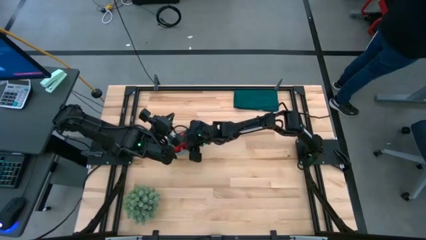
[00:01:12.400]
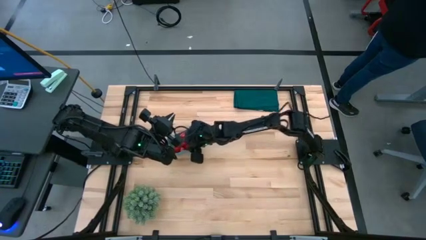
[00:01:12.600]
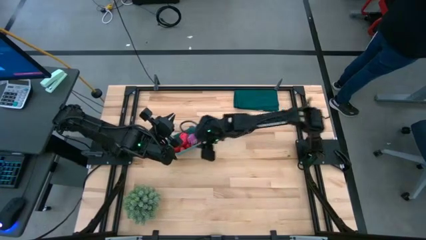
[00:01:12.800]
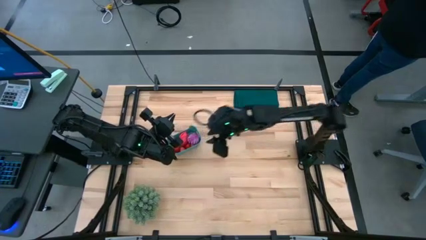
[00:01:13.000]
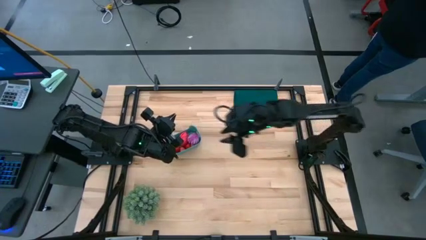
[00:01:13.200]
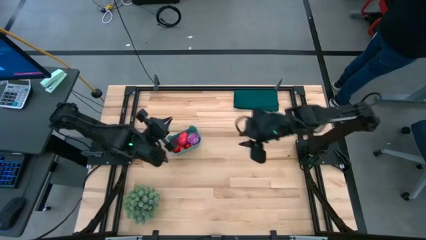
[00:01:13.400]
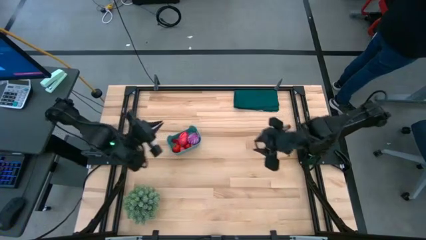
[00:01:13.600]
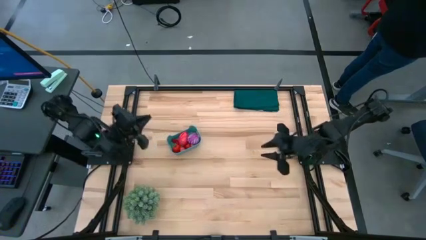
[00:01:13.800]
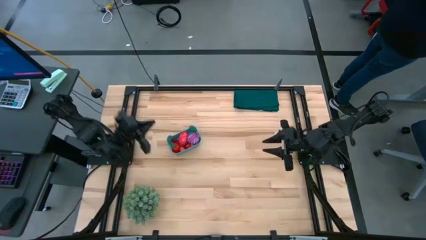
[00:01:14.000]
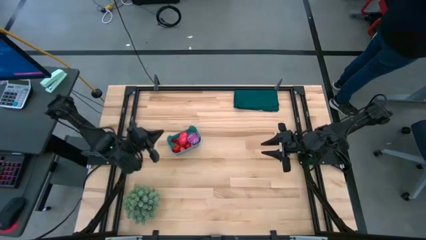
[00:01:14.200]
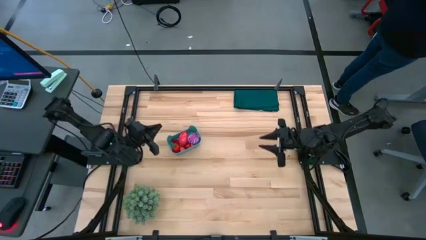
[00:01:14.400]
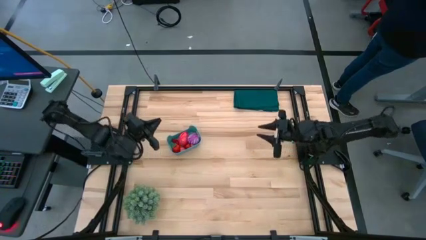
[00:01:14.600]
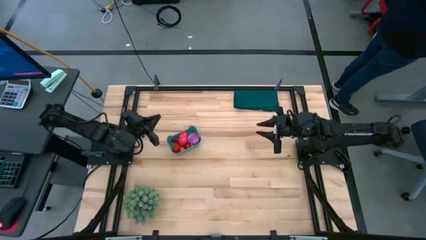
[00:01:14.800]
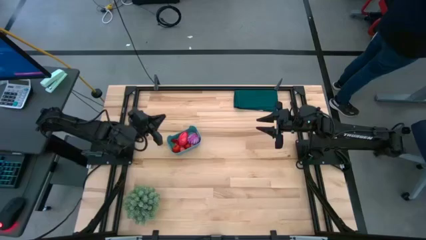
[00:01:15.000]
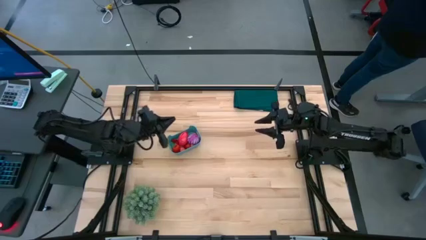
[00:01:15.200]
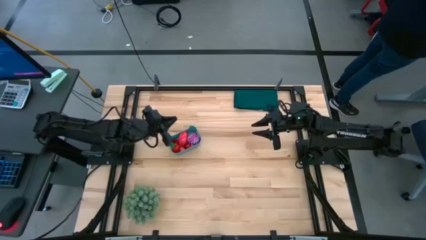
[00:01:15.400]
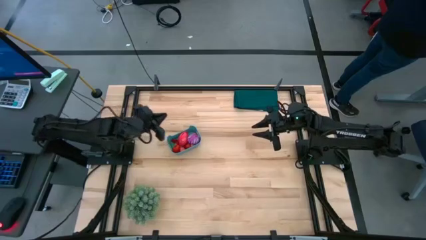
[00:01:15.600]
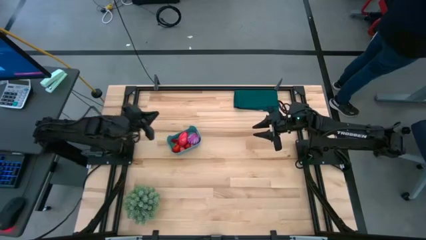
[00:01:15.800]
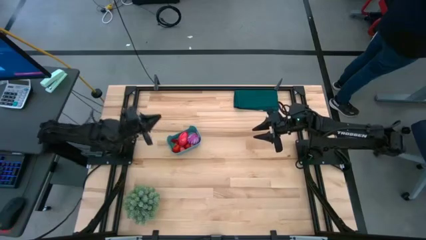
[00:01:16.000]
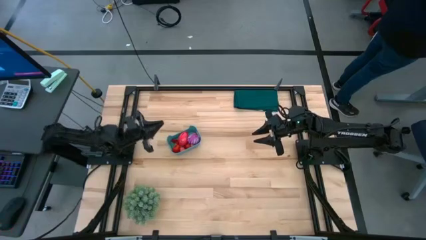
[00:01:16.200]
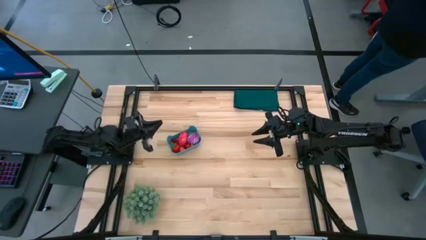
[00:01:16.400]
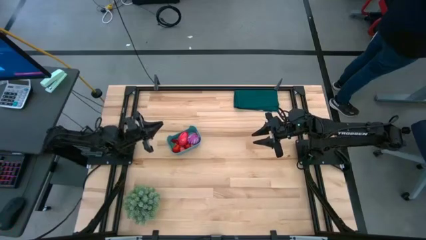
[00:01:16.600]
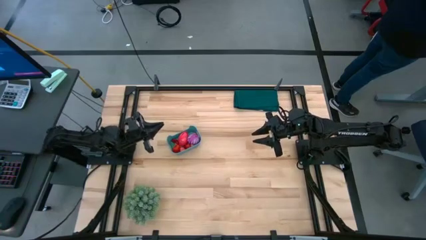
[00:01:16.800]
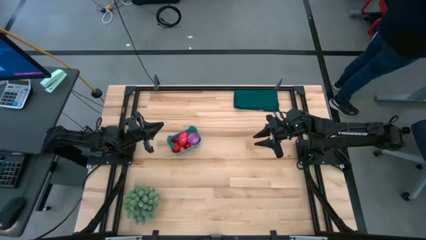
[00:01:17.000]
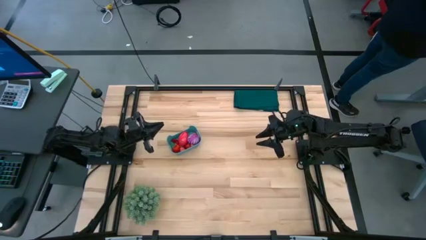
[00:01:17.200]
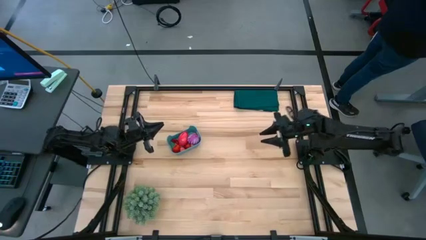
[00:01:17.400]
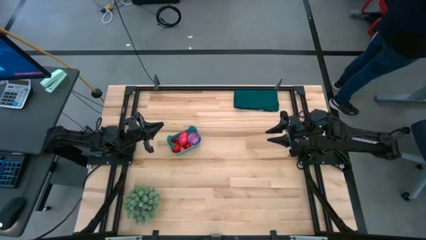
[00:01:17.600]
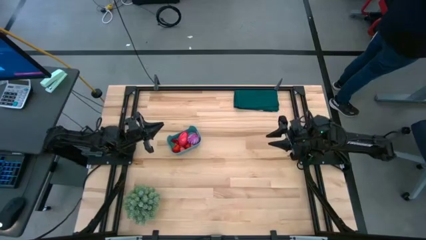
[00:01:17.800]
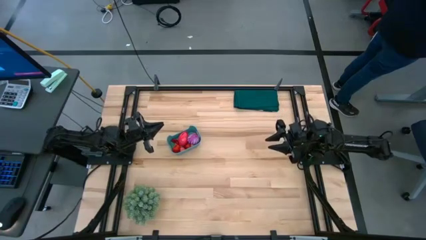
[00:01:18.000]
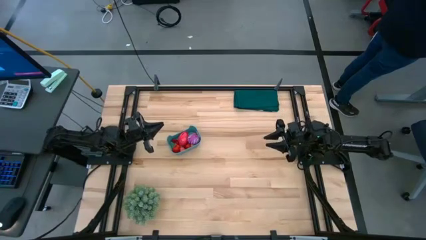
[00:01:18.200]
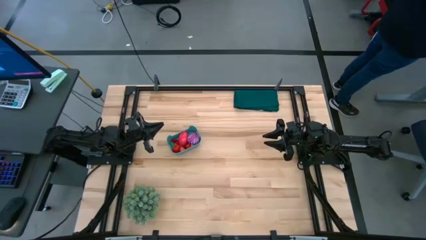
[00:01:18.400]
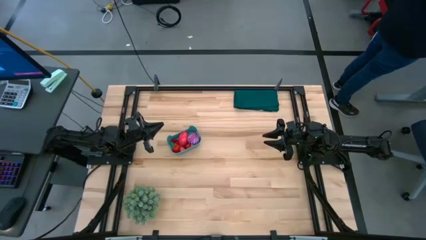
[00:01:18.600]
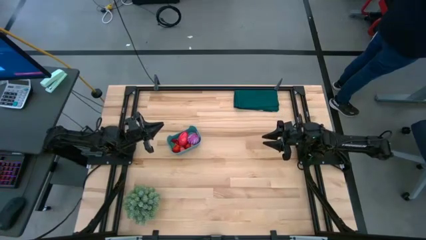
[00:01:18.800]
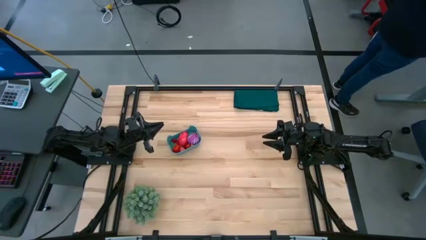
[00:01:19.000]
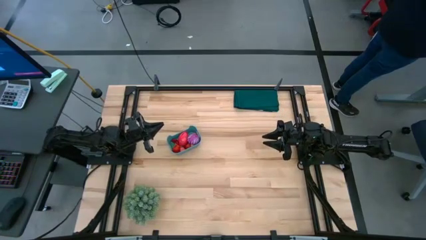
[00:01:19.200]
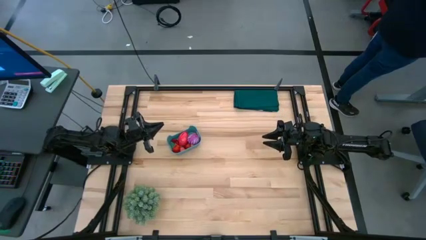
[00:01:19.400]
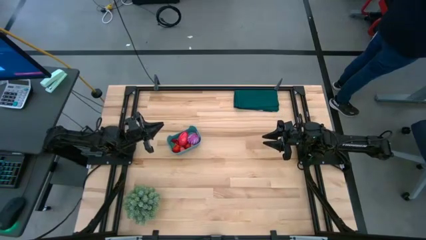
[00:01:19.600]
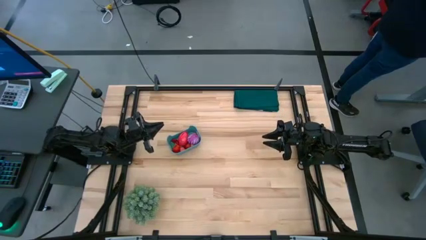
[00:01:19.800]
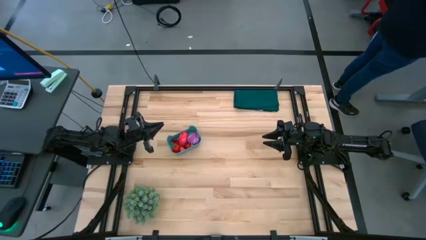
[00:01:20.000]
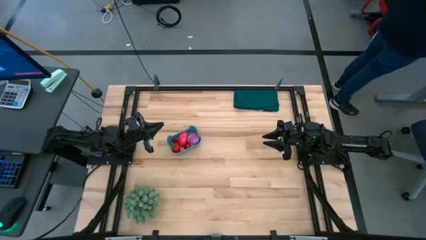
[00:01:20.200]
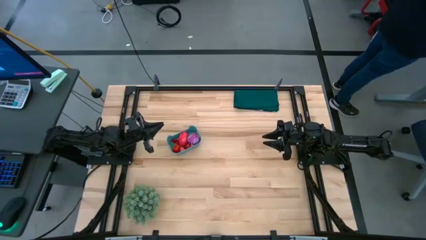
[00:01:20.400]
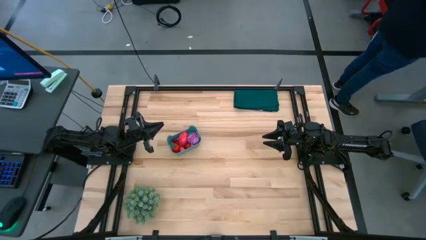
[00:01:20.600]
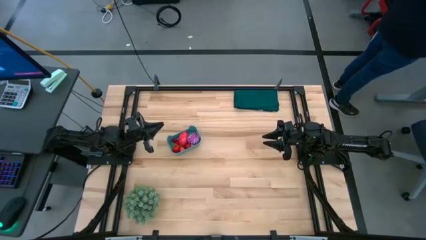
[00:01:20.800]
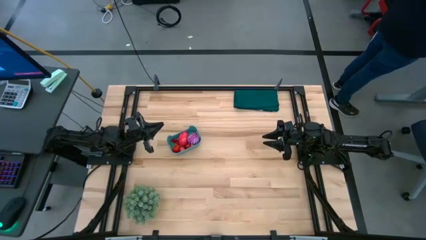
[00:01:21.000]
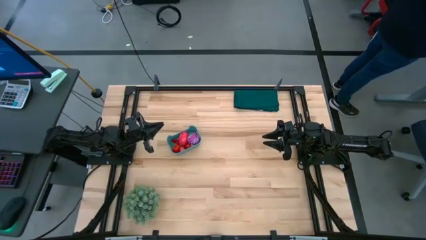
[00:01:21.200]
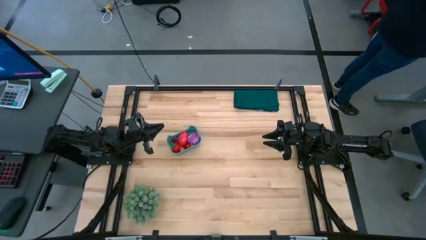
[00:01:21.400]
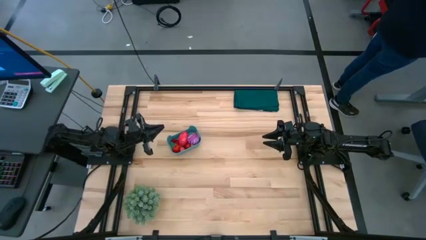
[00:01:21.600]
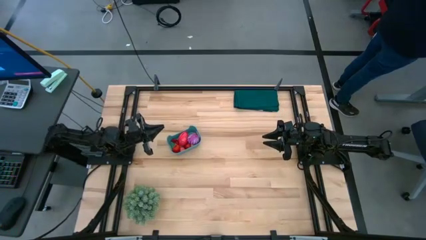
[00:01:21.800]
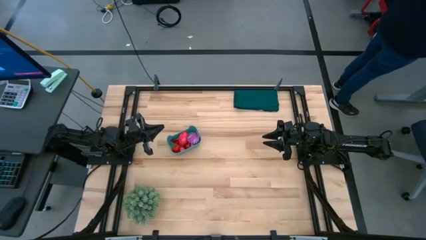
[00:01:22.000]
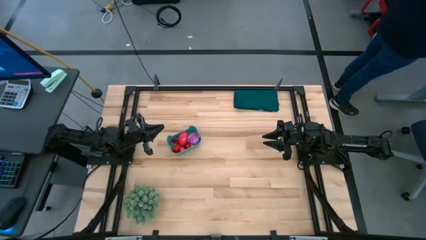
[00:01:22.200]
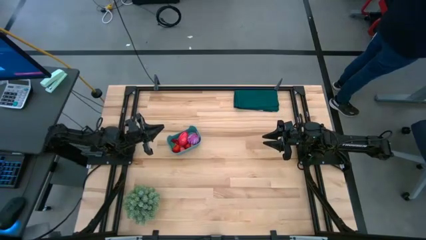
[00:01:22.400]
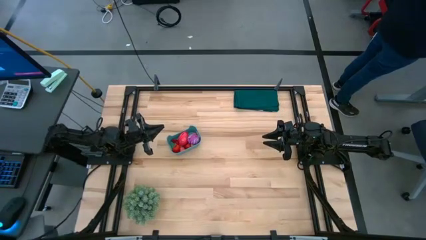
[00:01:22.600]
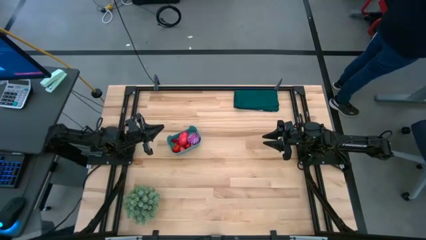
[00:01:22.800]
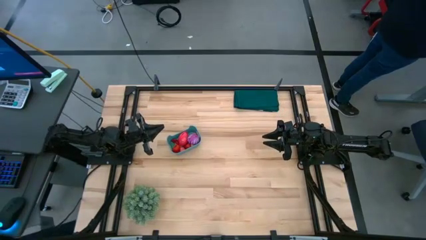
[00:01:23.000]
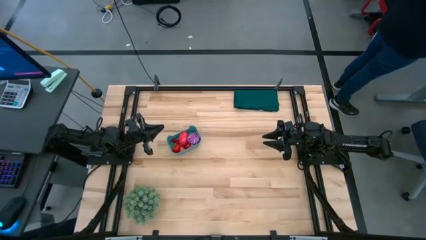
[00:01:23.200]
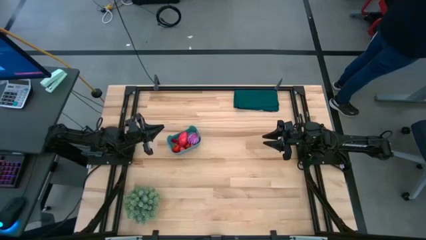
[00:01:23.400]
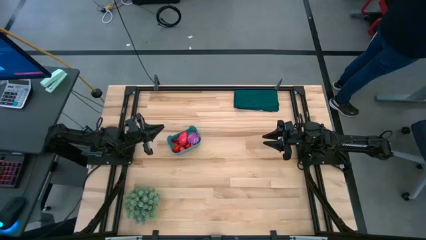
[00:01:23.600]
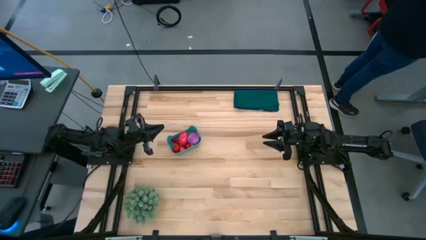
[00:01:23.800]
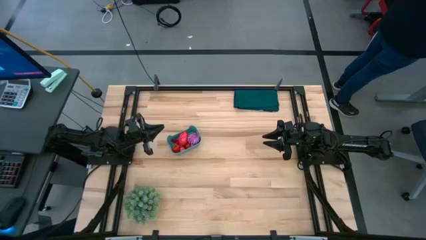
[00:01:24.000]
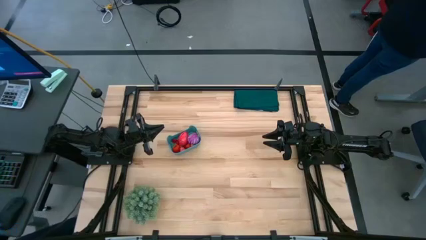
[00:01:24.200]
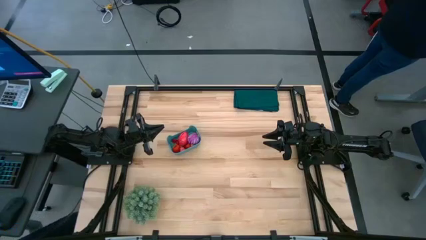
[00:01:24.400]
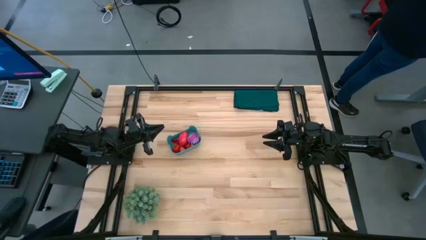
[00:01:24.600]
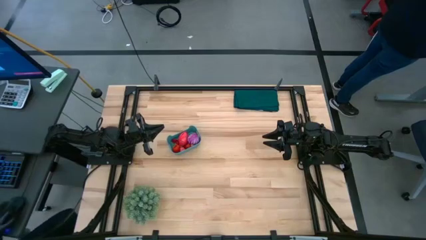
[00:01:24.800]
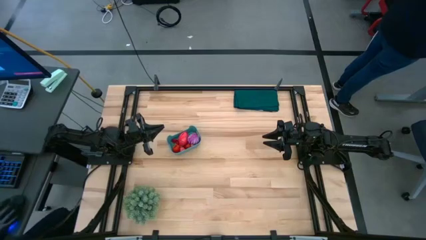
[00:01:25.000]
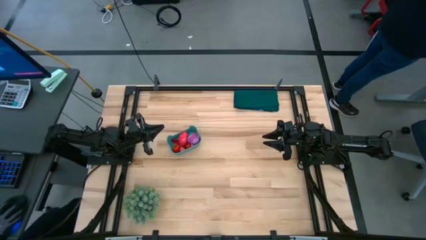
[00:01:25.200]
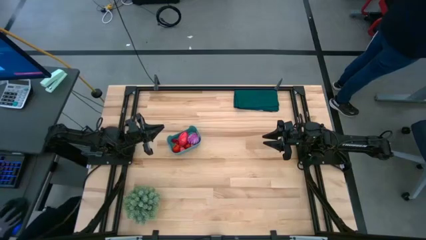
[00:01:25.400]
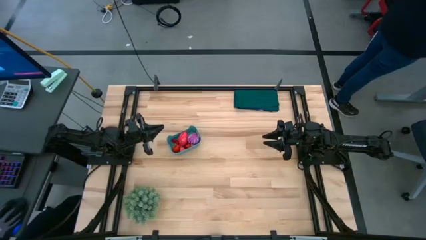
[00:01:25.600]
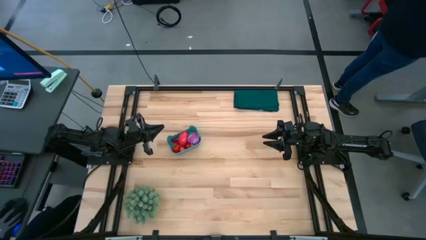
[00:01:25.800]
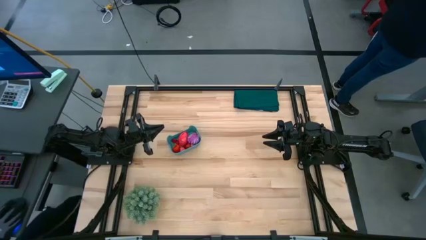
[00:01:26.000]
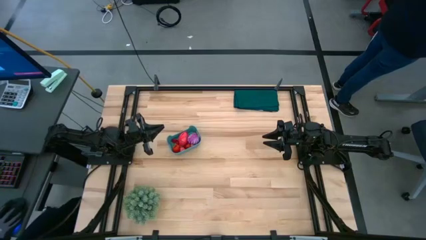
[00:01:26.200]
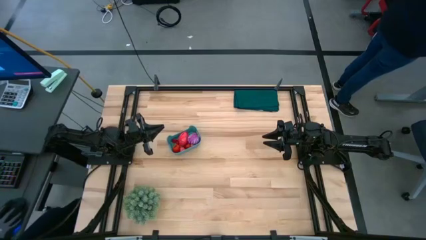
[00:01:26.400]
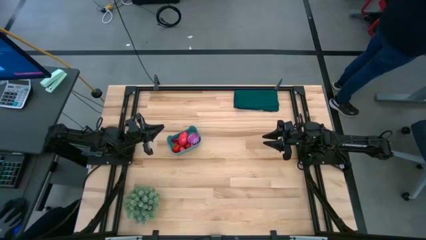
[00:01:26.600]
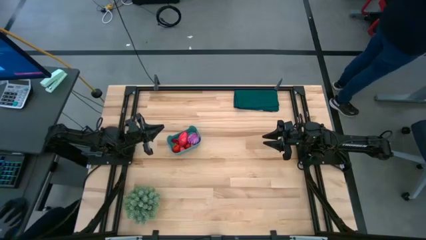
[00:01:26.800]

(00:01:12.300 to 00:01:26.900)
Task: Pick and placing Produce into tupperware
Return to Home Position
